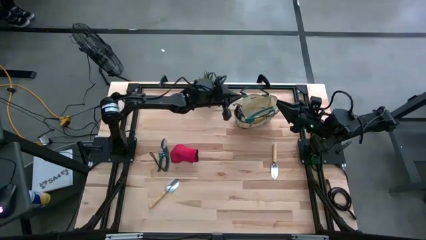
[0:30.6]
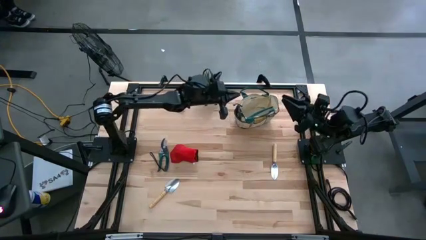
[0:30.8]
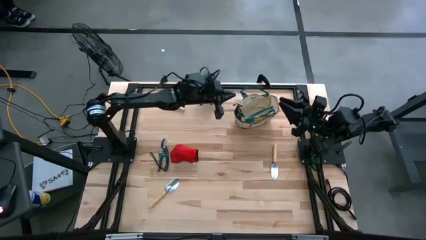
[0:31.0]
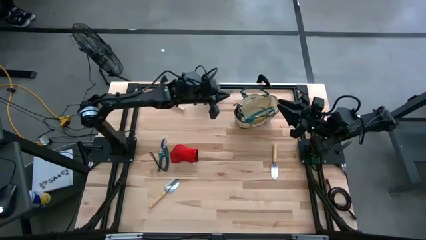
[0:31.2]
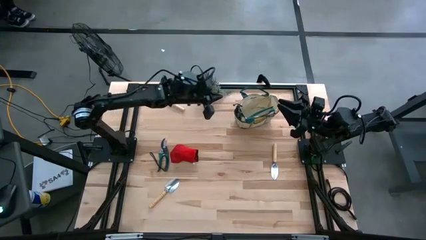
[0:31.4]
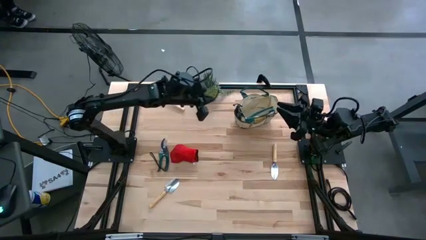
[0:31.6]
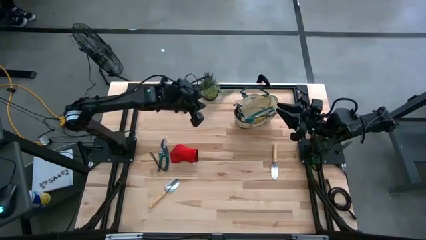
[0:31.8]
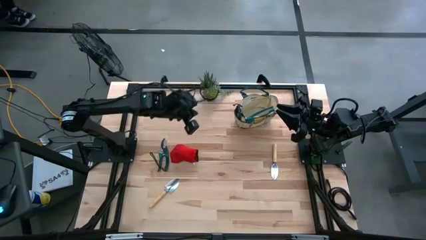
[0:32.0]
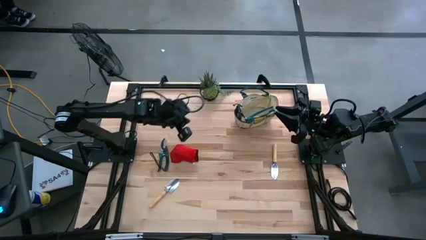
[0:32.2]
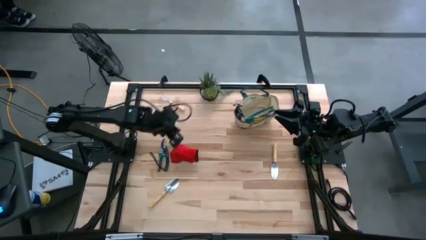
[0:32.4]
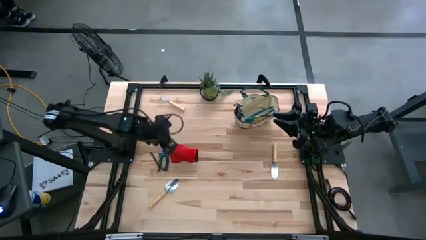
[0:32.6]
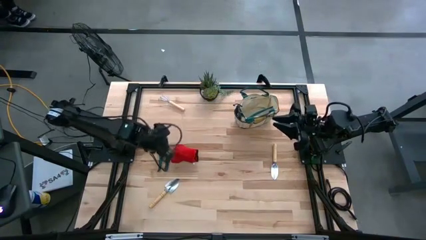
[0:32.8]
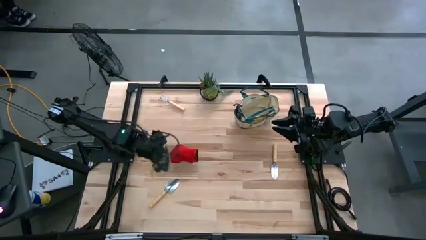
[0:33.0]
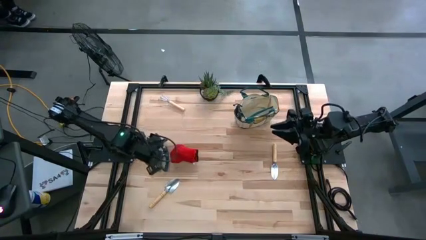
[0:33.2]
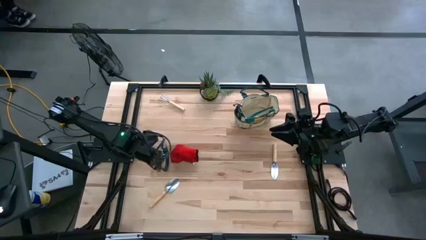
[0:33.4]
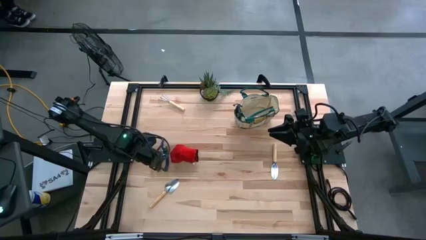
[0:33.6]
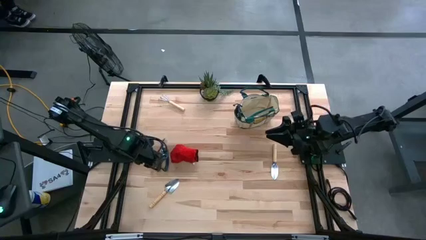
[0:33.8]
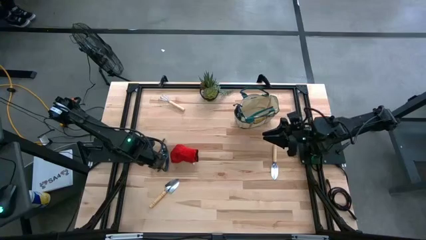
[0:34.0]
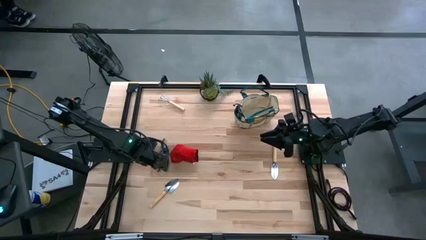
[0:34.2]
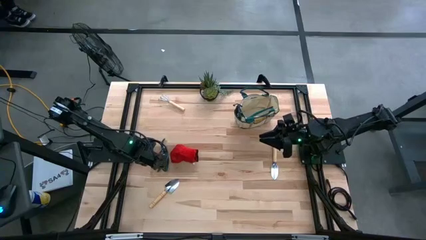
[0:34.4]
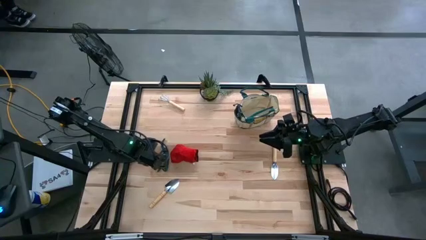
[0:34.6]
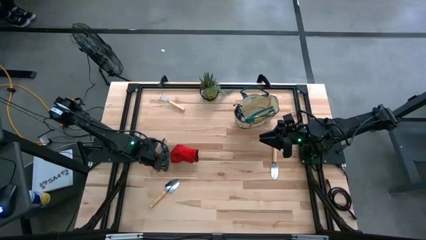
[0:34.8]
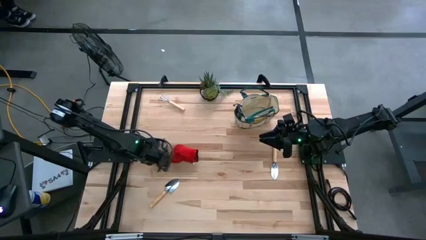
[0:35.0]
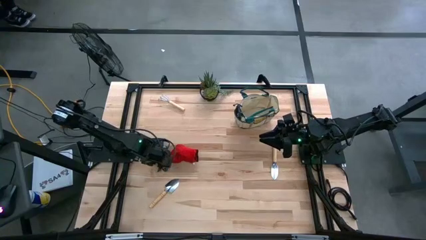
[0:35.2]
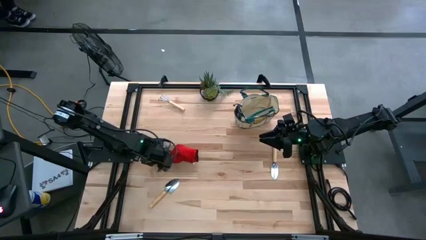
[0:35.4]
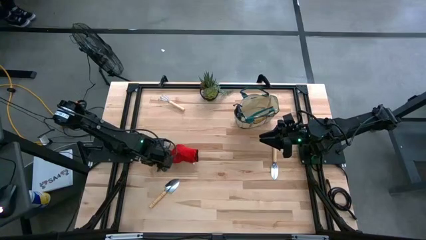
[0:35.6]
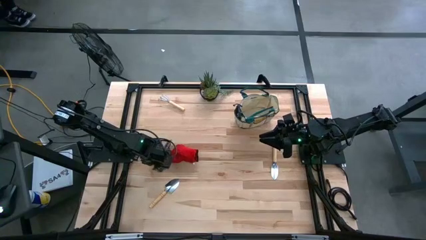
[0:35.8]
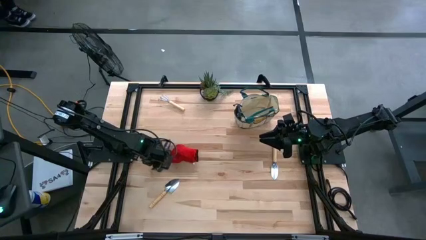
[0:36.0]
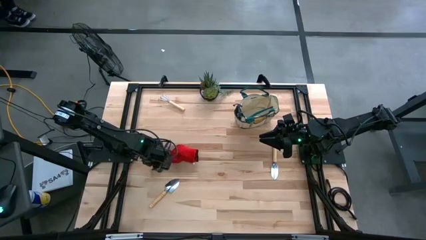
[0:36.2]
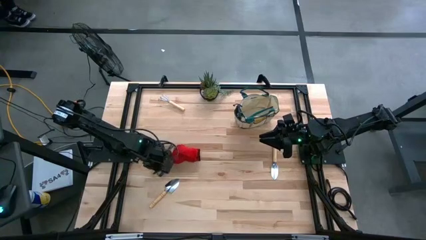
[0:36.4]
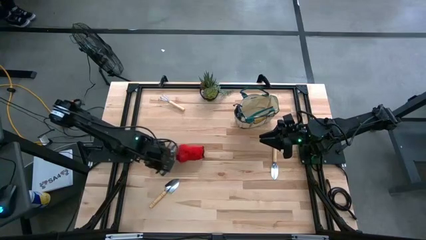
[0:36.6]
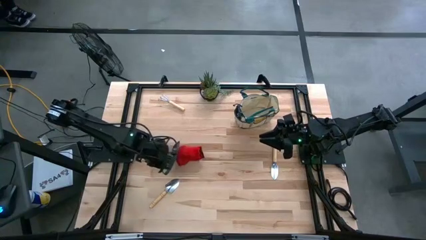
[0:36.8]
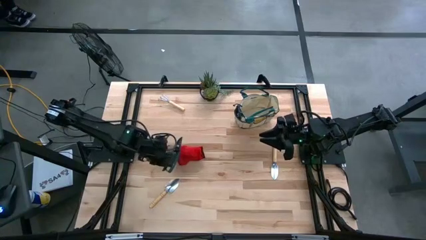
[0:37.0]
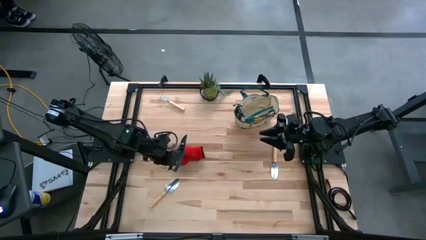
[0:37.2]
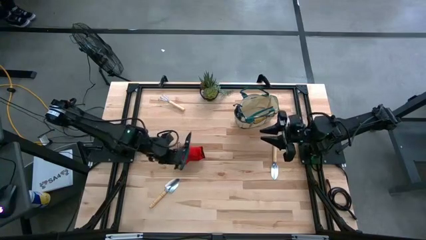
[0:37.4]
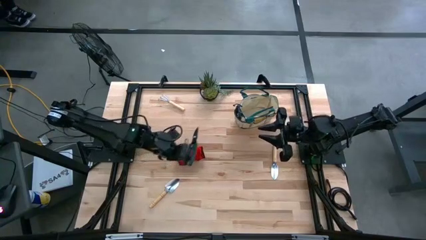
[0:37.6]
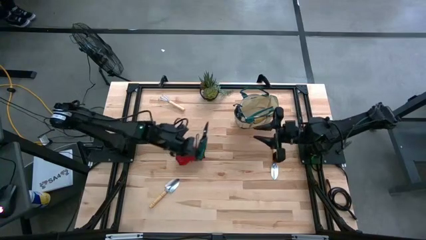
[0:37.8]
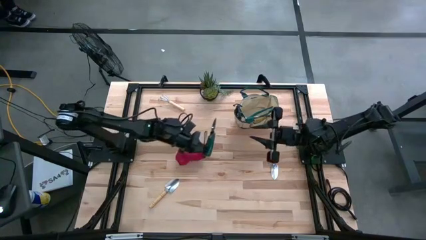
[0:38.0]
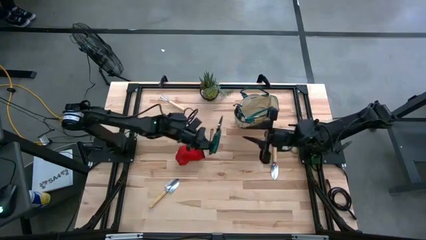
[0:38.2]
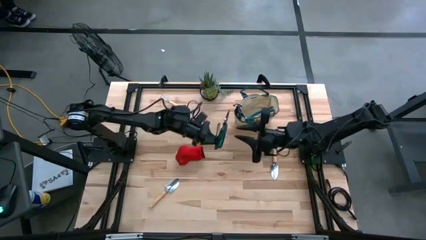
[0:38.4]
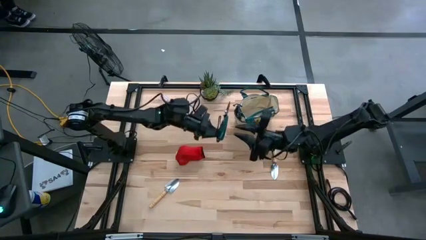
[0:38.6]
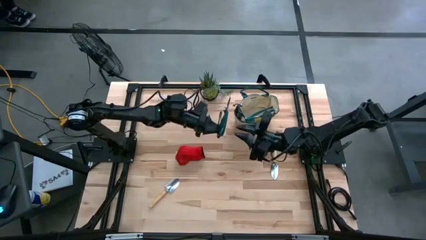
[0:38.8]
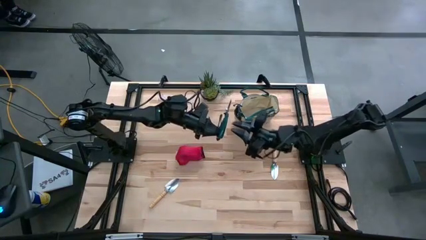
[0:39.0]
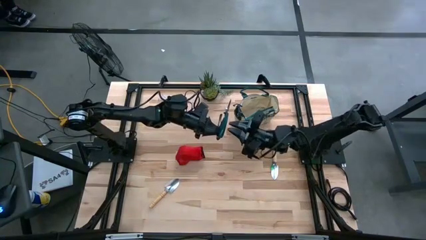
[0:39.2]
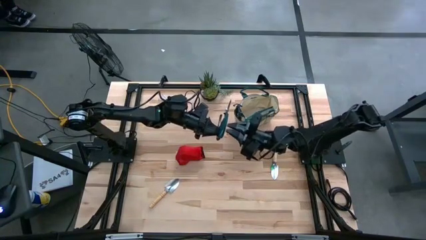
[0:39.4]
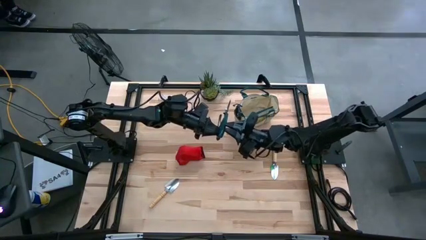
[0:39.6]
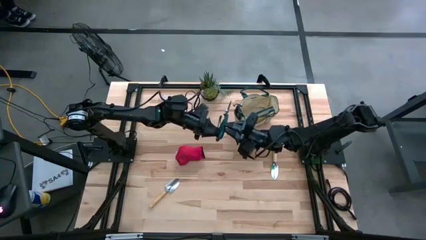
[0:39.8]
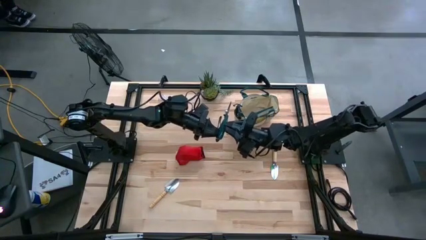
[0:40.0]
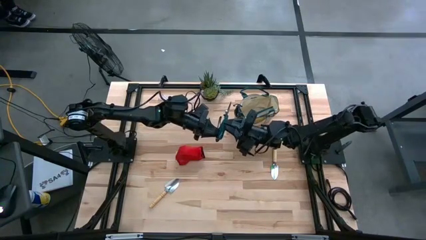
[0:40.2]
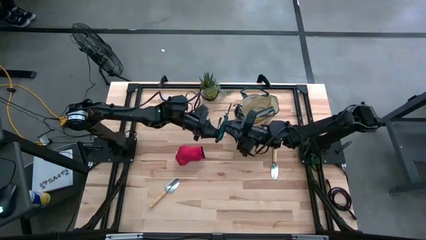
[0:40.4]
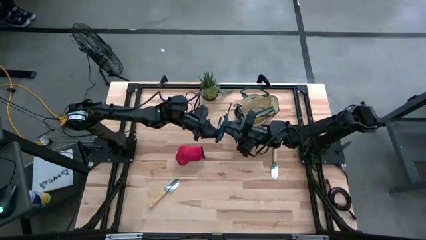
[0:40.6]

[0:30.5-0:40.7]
Task: Pick & Place Garden tools in Gardening bag
Put the green shear scissors into the light brown gardening bag
